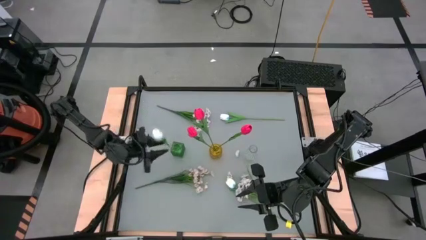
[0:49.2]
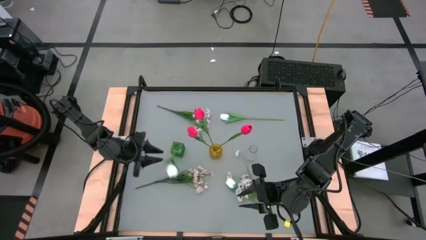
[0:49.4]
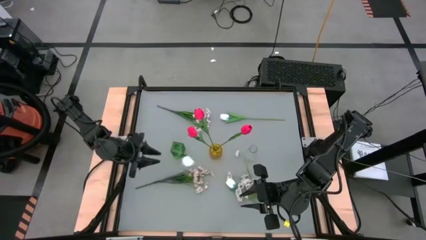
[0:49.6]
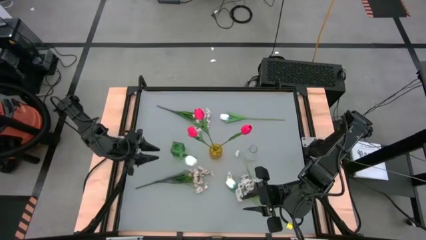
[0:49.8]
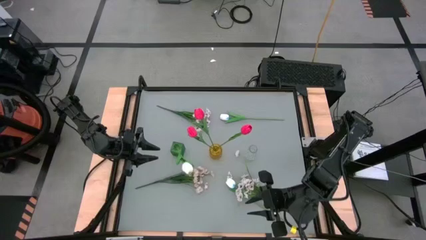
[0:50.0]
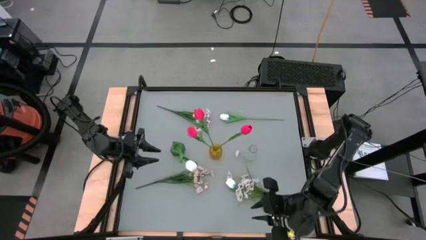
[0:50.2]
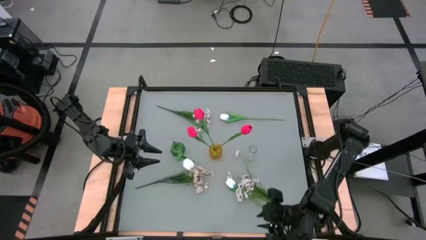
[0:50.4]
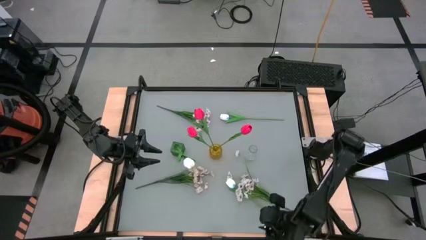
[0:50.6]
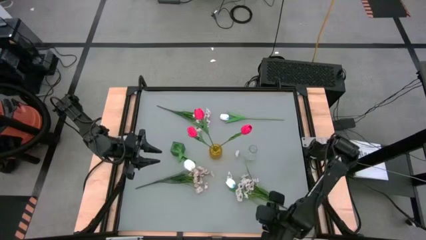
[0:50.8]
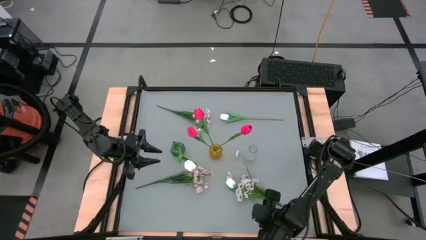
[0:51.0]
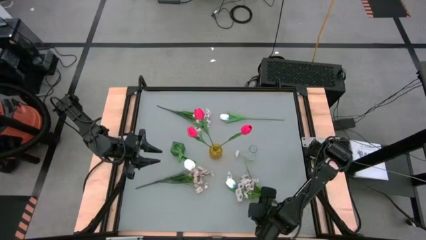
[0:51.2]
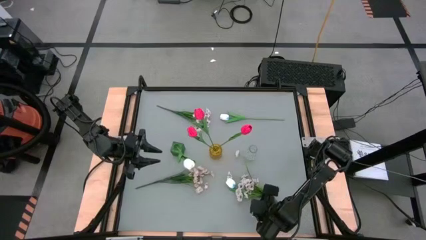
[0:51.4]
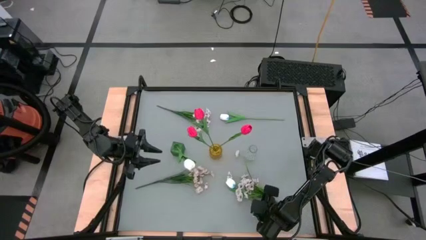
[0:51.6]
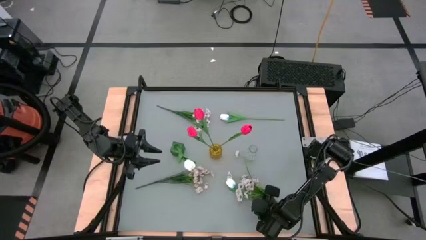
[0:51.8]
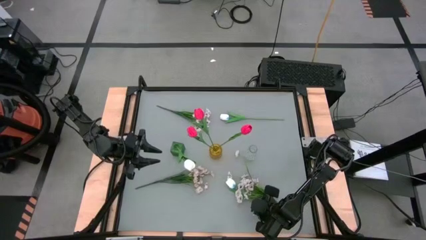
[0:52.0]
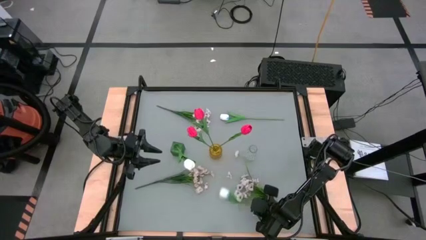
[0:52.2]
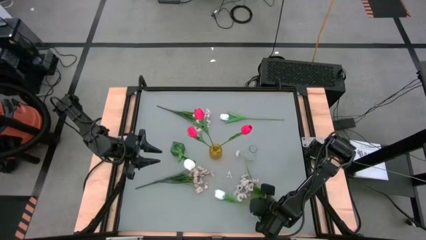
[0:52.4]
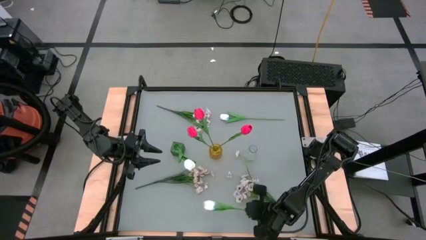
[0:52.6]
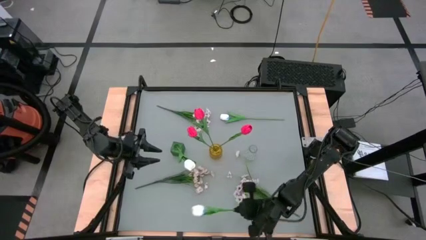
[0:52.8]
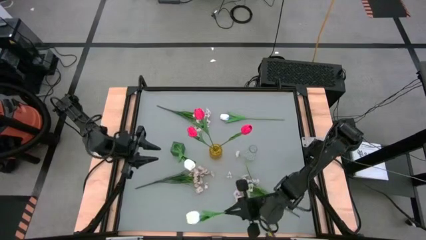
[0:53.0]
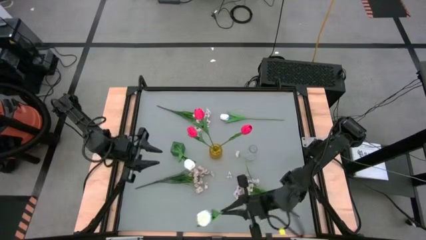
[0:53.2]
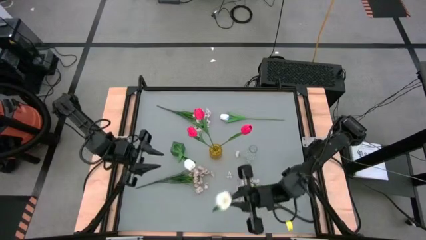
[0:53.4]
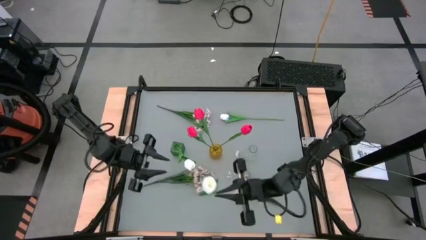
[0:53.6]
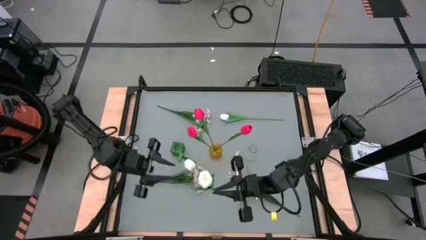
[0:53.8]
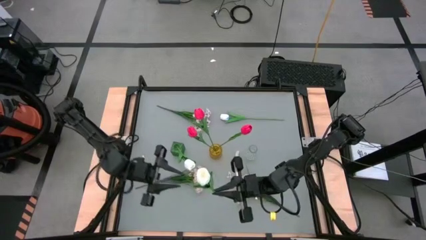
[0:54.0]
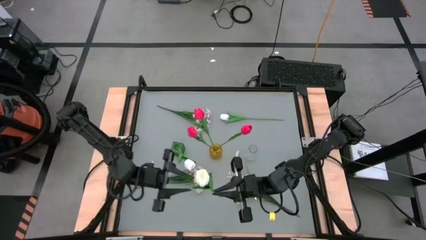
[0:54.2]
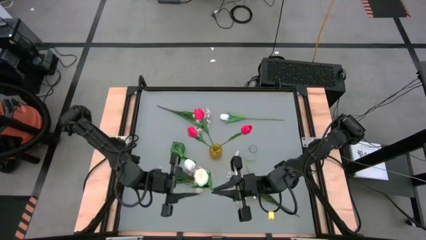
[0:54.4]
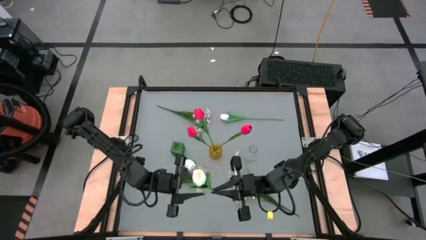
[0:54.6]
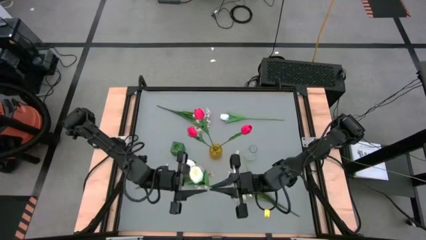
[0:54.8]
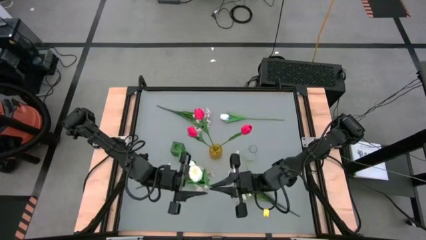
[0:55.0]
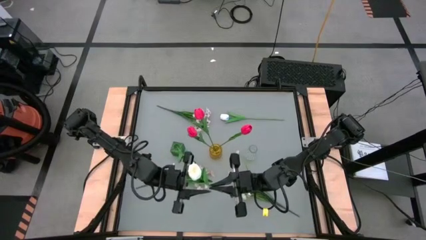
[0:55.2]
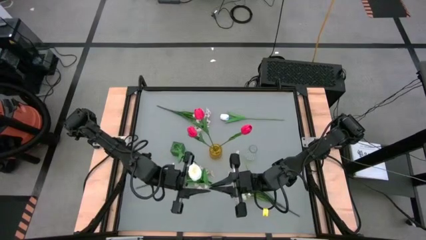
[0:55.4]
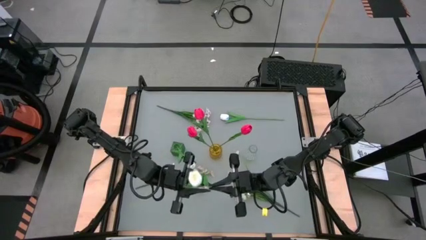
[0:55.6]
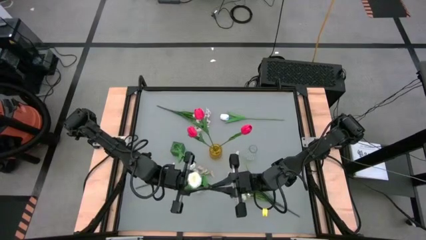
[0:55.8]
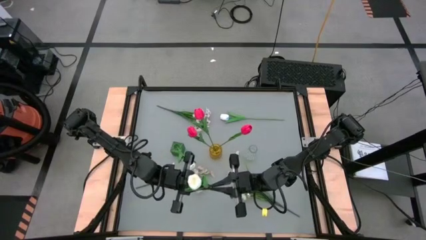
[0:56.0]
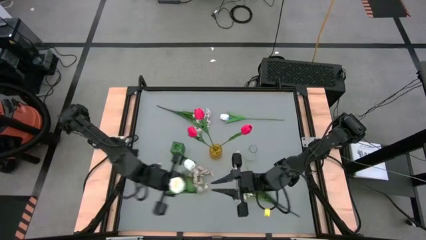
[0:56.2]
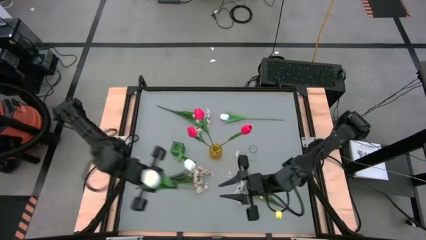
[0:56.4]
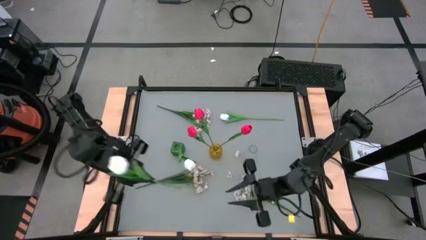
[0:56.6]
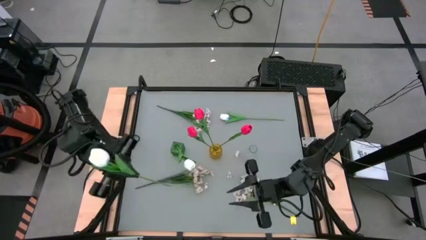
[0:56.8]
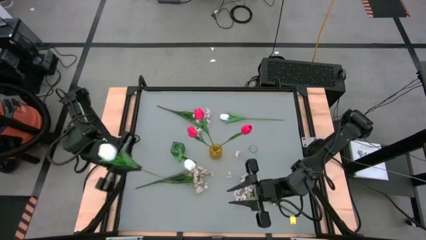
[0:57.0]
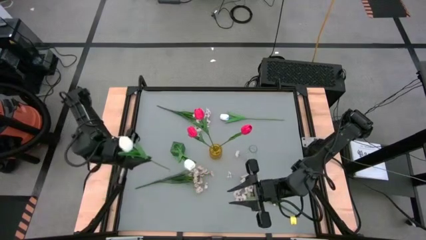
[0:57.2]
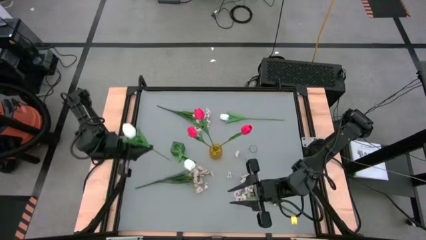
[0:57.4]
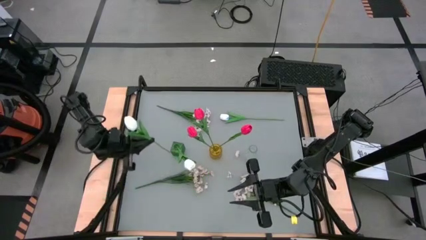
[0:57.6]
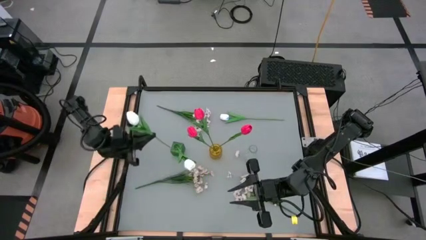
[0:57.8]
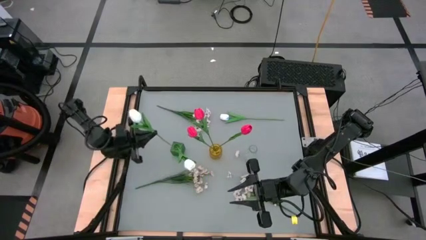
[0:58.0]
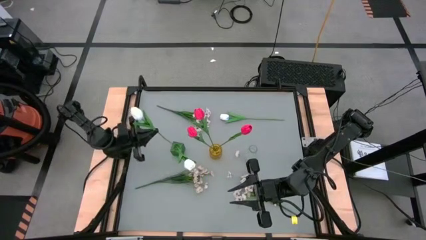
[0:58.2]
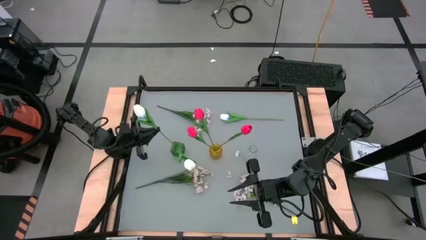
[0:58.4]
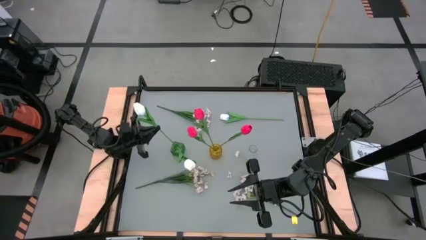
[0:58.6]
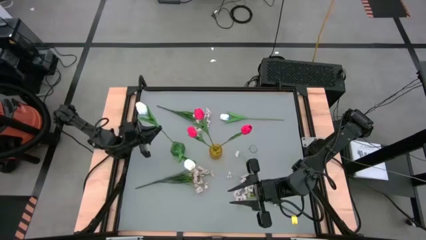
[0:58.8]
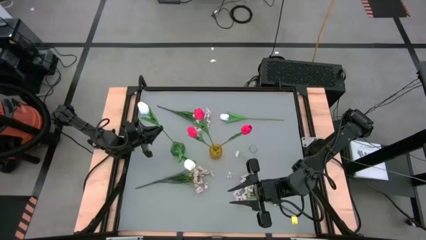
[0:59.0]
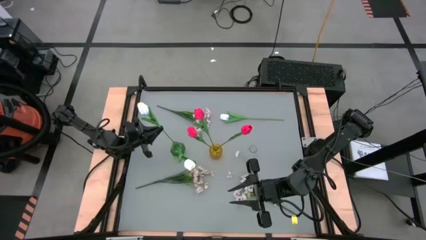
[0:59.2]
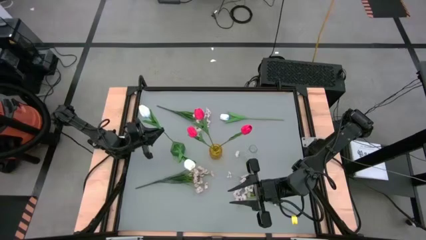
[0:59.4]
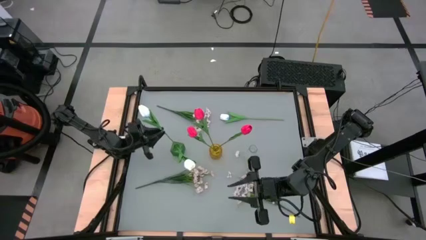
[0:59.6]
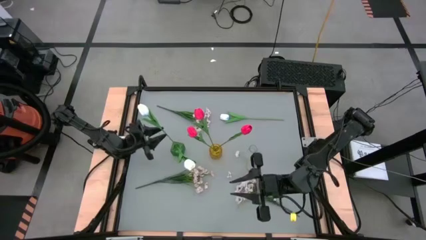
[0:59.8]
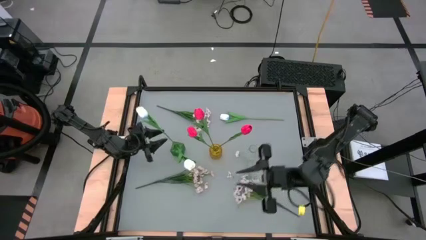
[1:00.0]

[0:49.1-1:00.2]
Task: Sort flowers into vase by color
Put the bottom white flower into the green flower vase

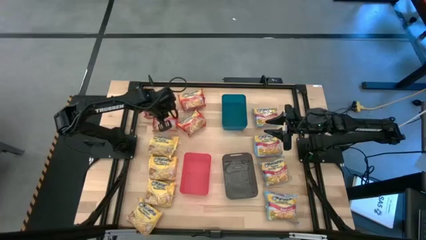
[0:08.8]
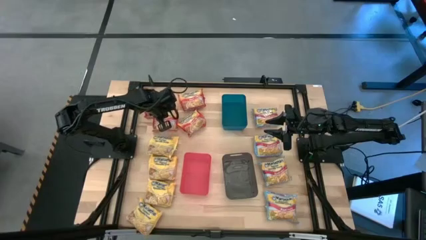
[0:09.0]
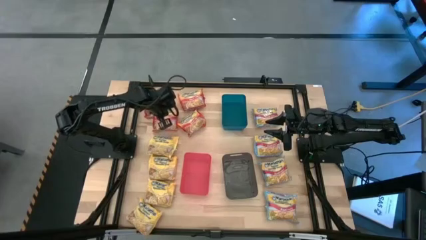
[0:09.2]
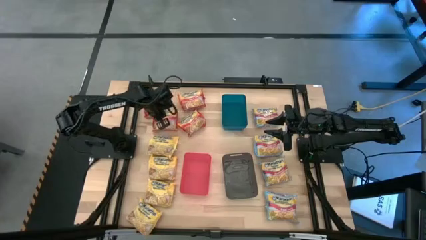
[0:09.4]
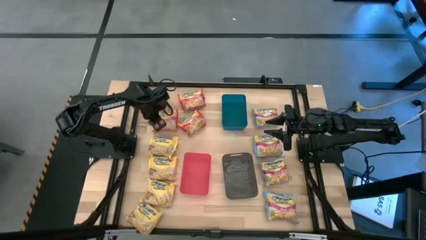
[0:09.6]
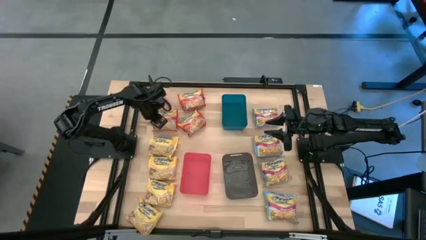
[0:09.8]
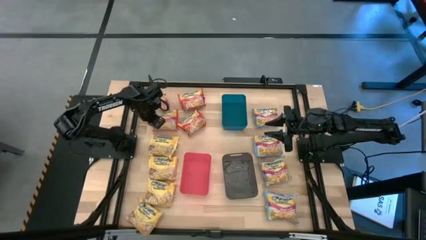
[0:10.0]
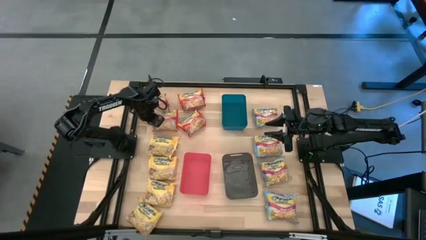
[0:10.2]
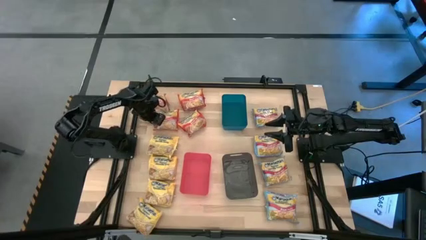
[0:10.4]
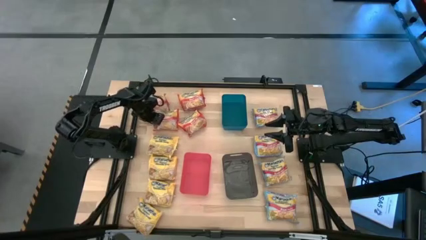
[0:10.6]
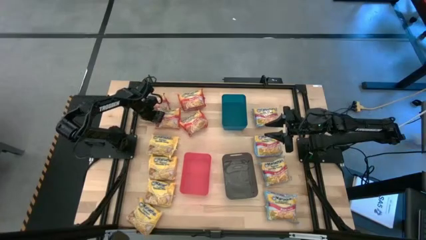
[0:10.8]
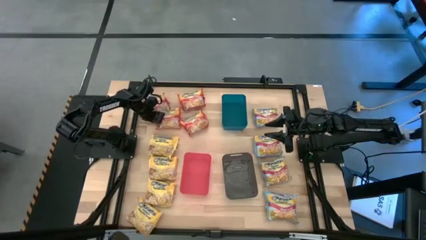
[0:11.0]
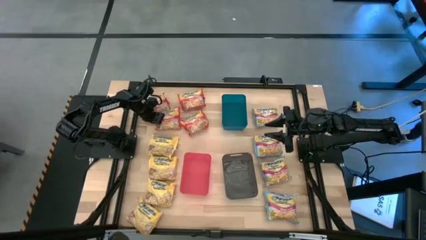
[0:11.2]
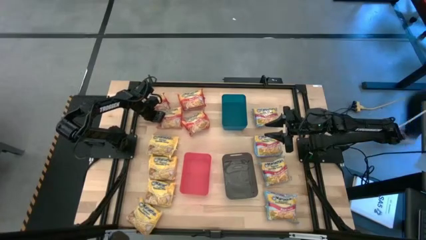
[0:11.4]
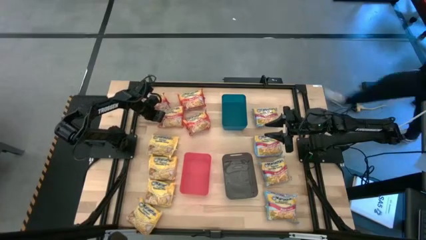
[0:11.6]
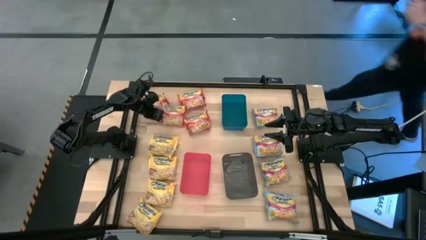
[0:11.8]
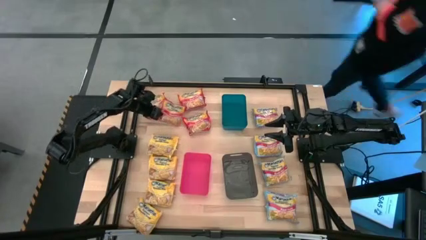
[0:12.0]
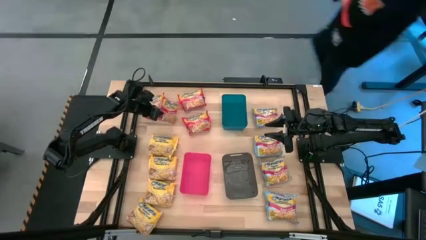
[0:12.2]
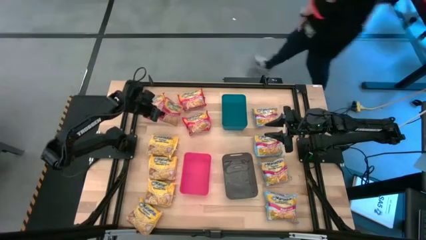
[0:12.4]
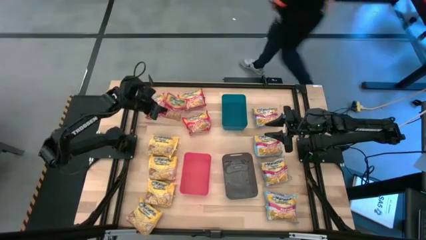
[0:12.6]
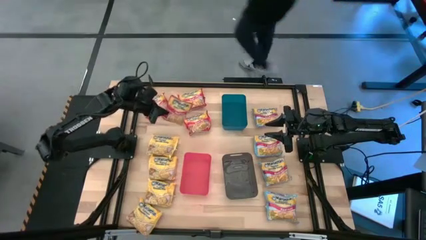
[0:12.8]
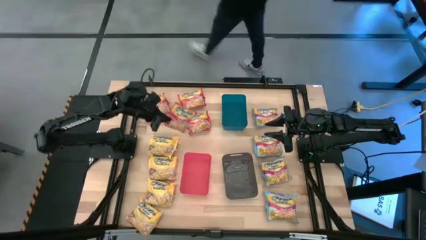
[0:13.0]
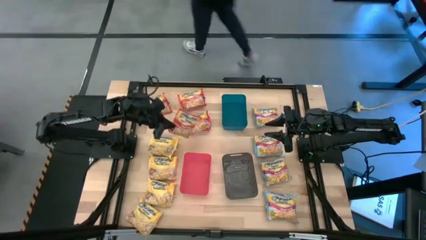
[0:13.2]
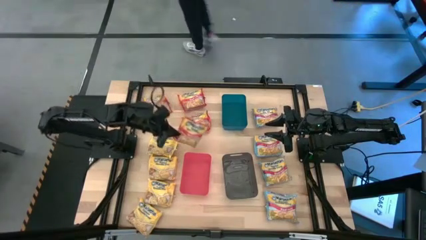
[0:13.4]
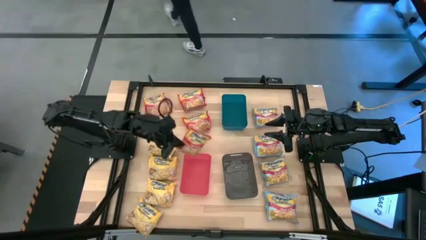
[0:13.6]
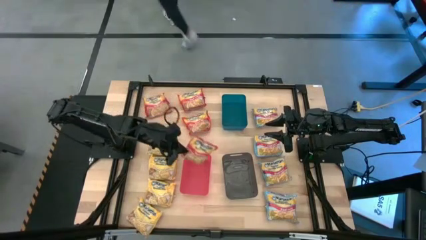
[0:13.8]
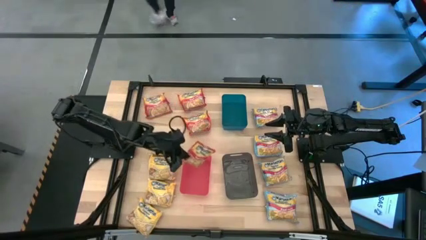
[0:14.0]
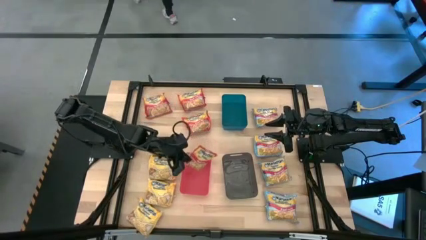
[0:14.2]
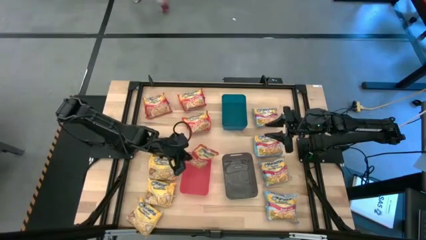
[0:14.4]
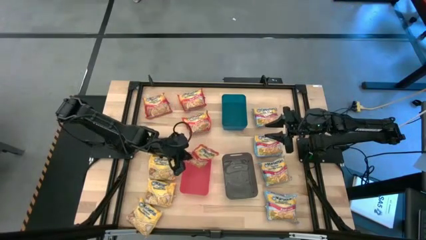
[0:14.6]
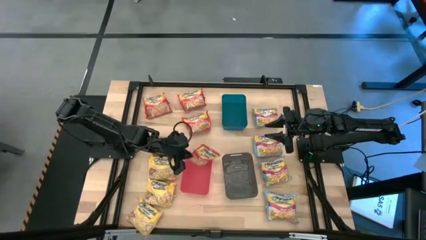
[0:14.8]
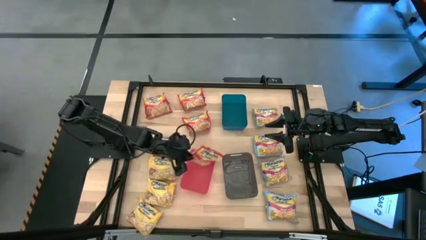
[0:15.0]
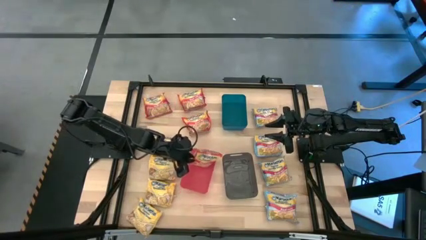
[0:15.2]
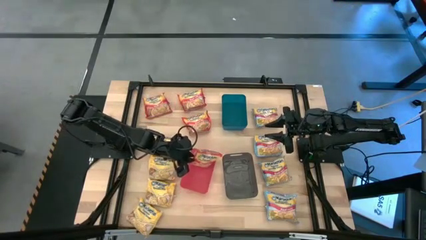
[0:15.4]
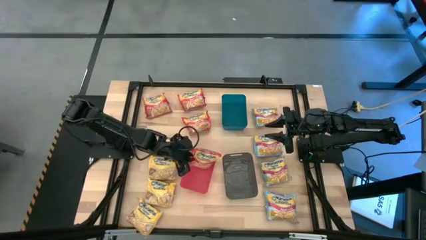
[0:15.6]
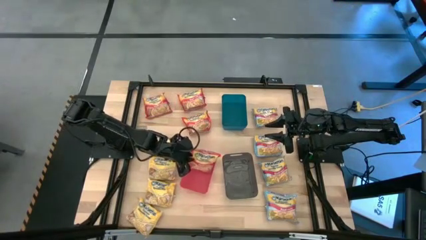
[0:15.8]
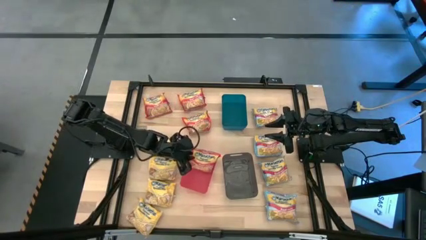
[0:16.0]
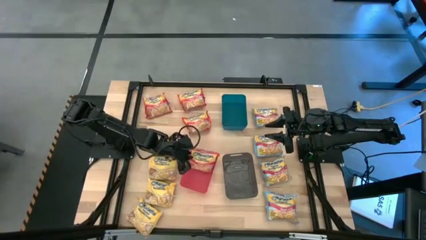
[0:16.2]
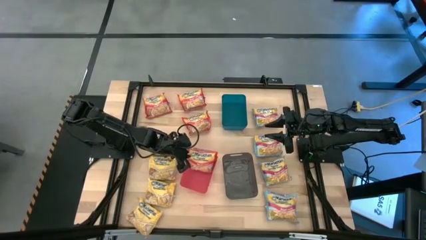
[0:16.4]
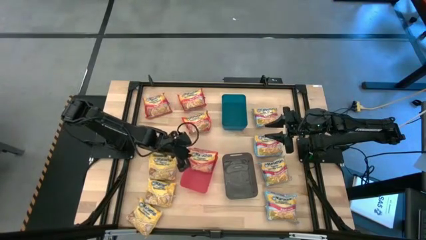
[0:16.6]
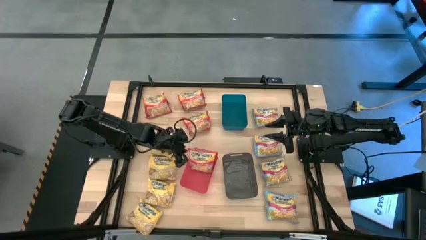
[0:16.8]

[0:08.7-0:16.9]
Task: Sort Maruchan noodles
Put the red bag into the red bin
